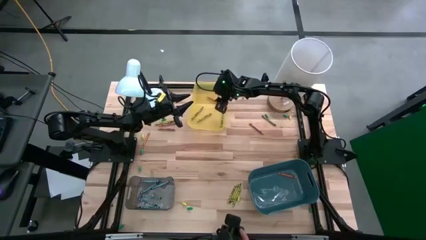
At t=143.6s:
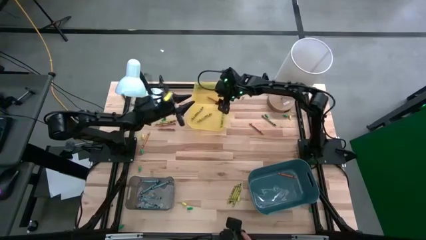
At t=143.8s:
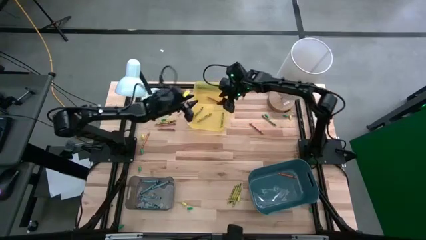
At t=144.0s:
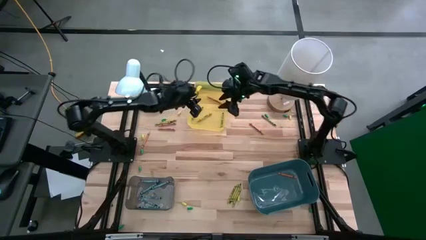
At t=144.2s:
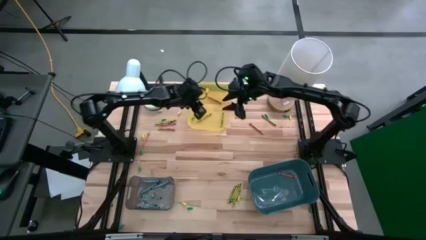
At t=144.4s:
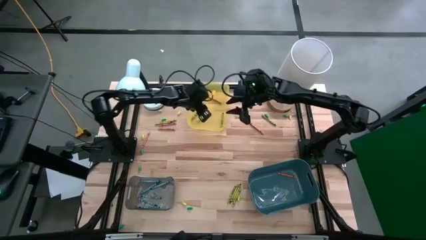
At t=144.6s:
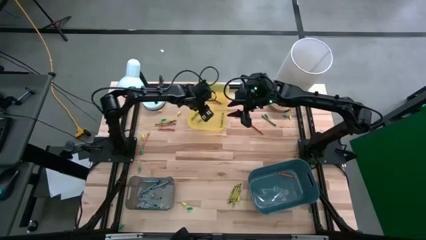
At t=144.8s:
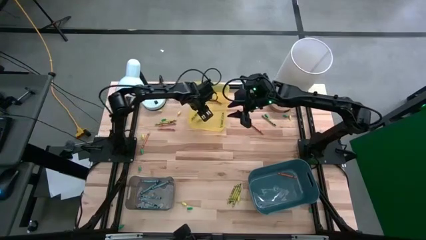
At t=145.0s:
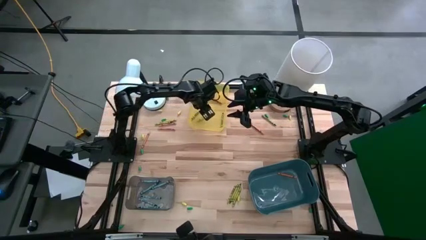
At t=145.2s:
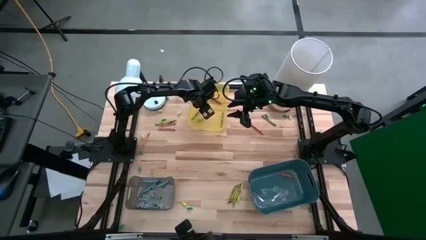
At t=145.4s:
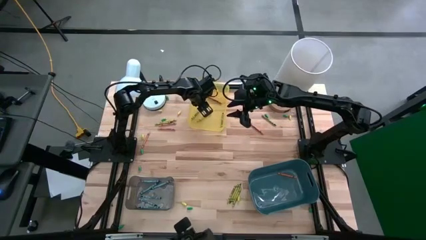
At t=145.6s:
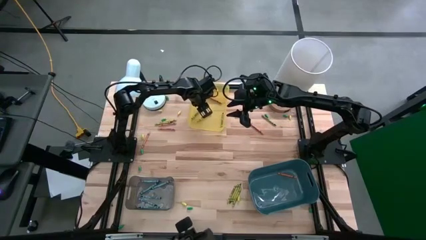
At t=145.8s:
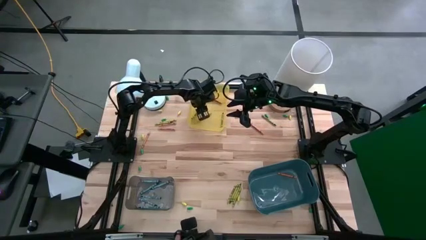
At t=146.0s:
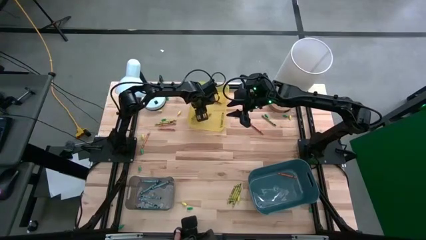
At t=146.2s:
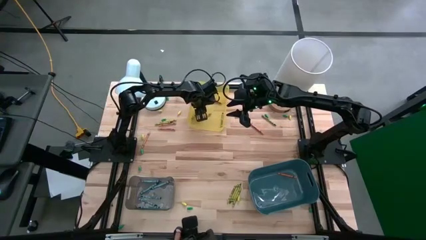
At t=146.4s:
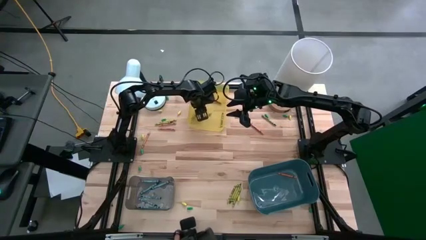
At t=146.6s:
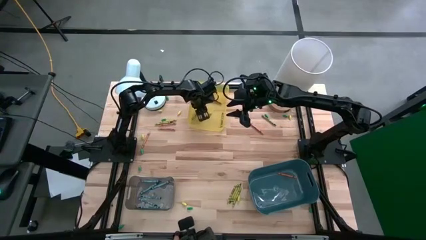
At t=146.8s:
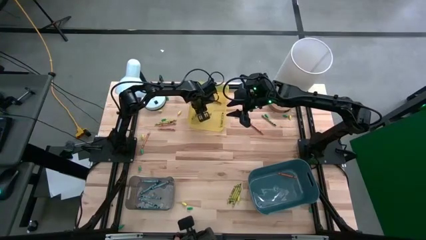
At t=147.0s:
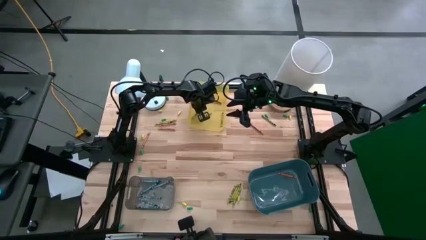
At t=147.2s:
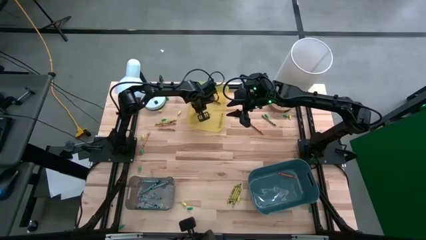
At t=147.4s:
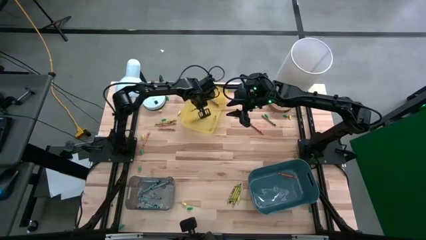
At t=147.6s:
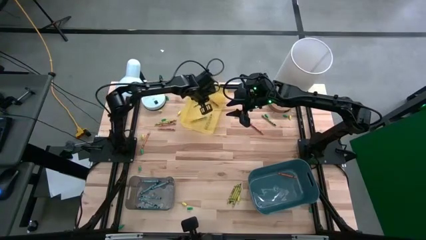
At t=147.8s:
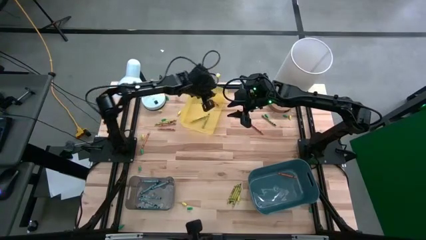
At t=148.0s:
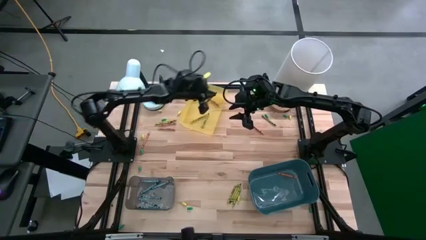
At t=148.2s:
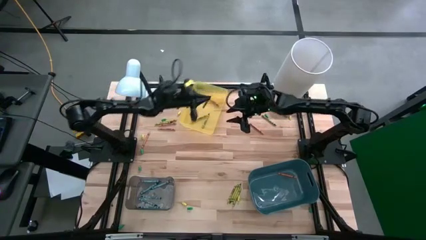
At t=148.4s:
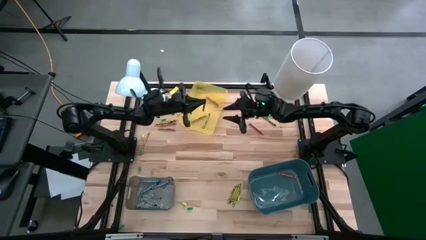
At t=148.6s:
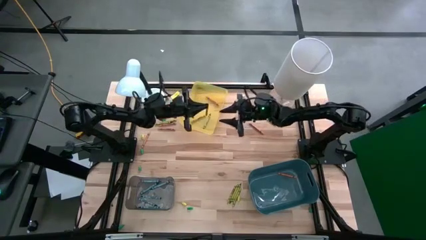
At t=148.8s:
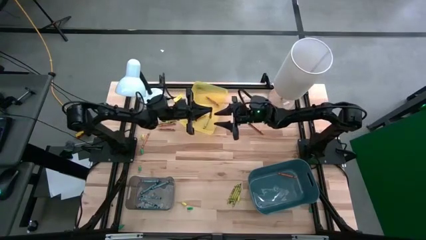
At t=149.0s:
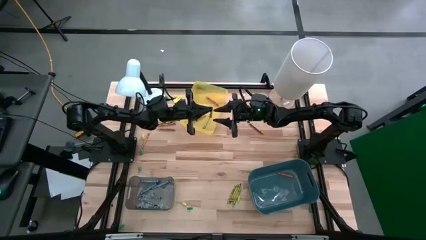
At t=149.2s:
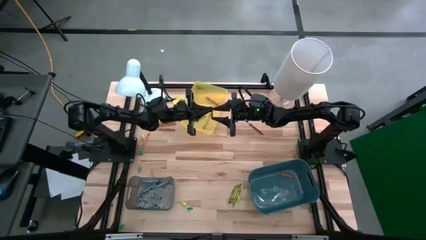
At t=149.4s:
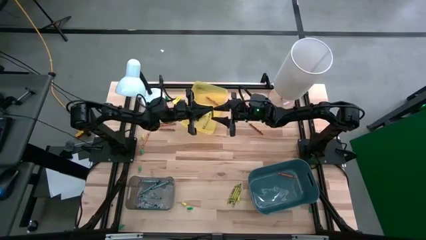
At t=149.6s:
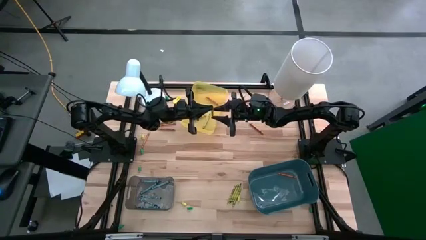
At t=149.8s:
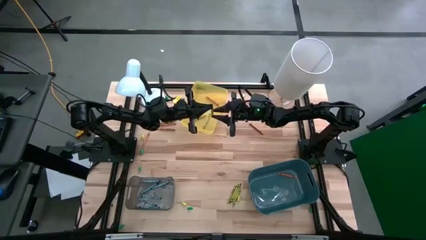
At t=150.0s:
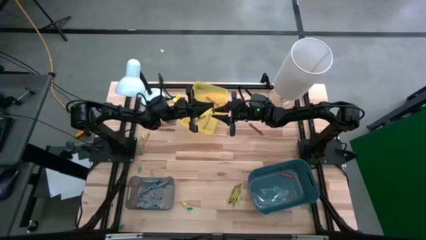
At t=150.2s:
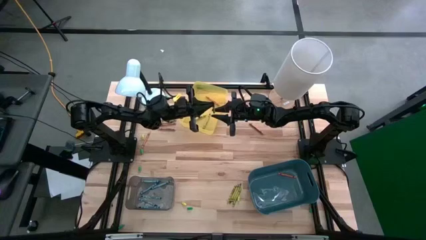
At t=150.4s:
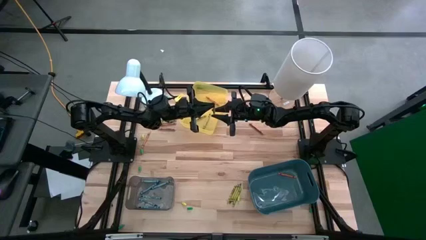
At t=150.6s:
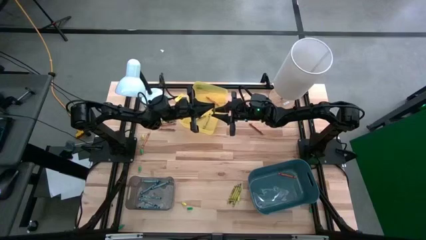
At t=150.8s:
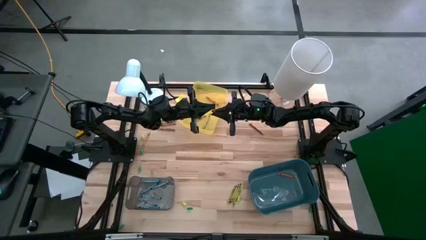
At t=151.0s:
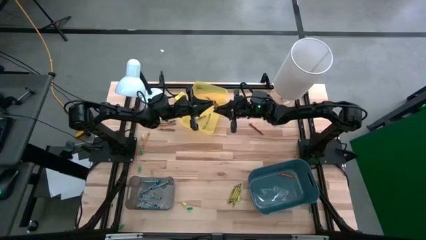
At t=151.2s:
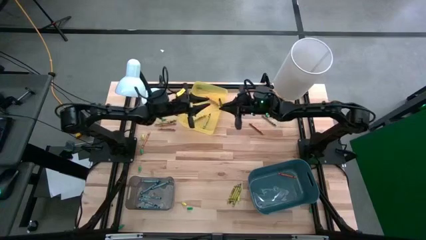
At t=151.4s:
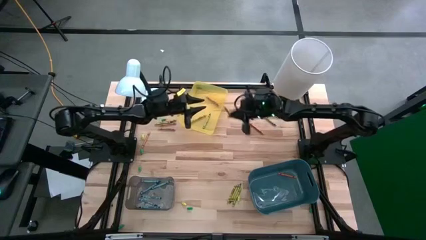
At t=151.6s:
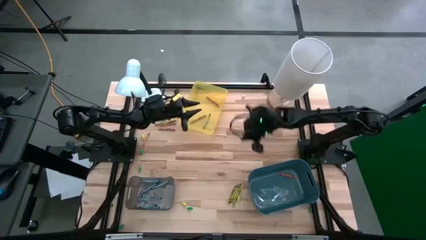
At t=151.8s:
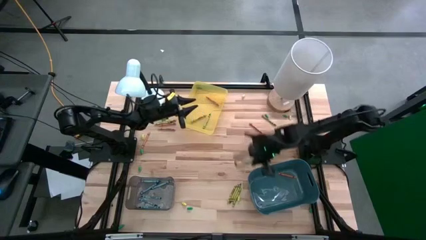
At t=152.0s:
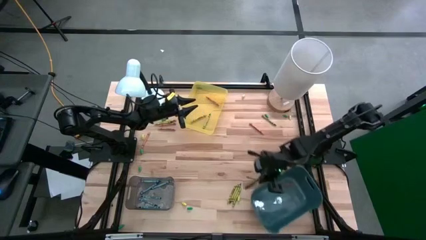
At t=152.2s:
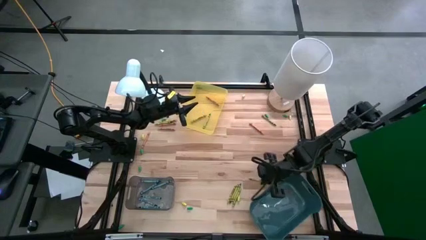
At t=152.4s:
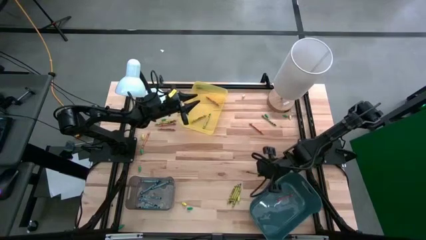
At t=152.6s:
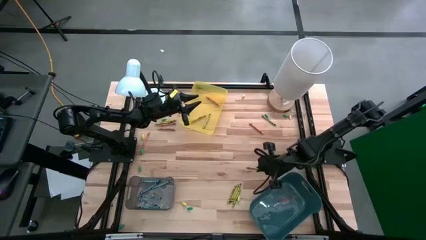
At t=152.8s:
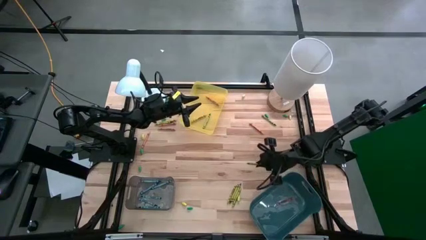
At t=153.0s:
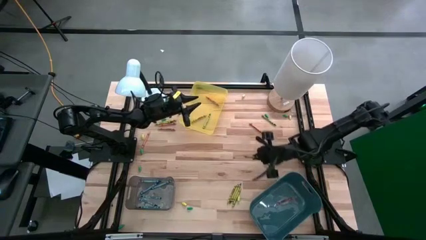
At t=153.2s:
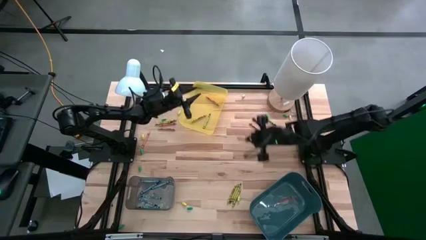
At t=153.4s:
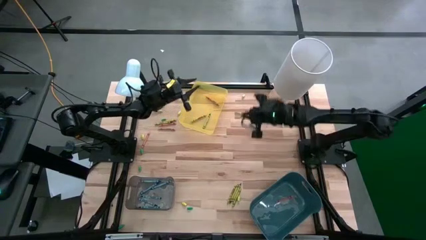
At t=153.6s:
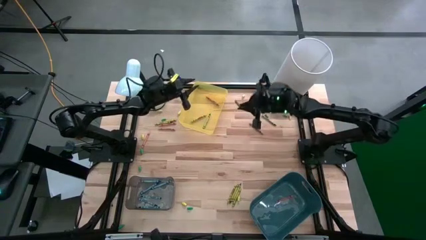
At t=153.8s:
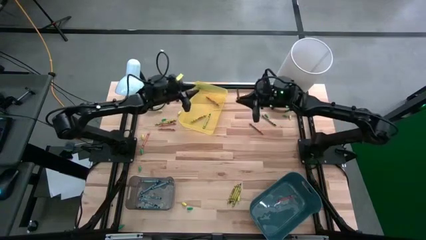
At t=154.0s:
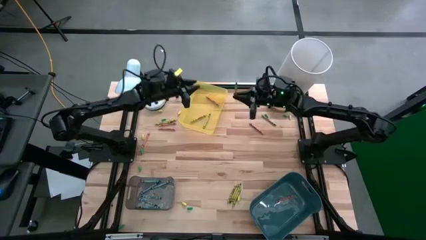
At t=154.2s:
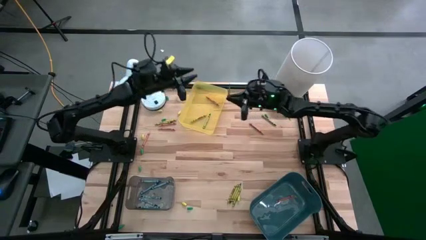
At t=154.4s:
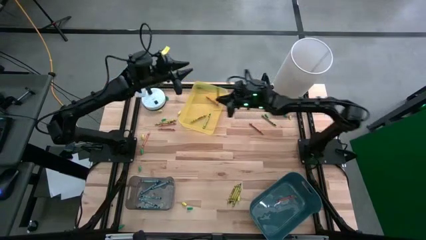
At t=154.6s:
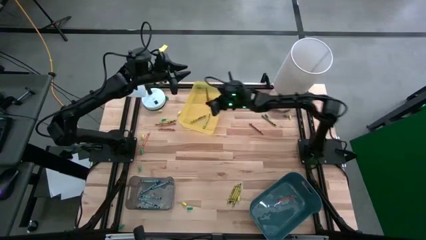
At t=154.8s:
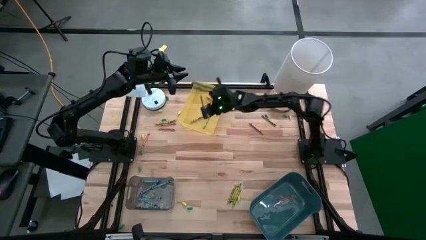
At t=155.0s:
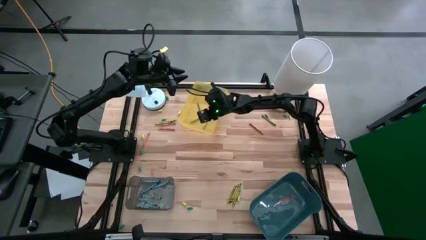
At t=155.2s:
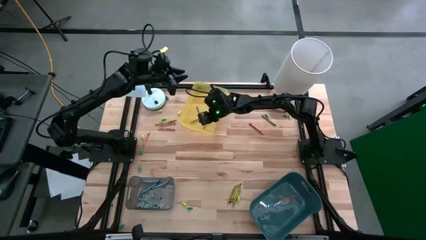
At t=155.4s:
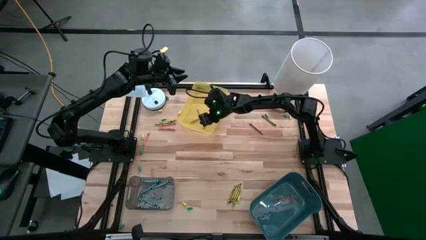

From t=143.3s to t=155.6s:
Task: Sort crayons
Adjust the green crayon in the yellow bin

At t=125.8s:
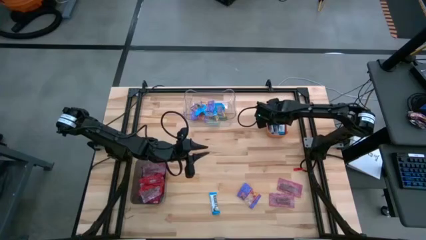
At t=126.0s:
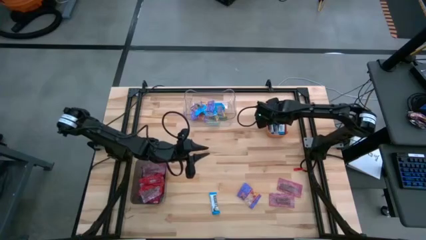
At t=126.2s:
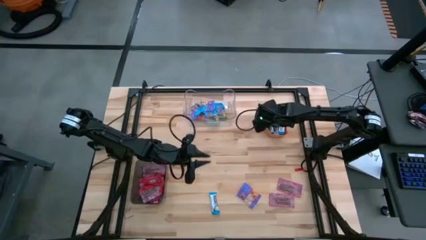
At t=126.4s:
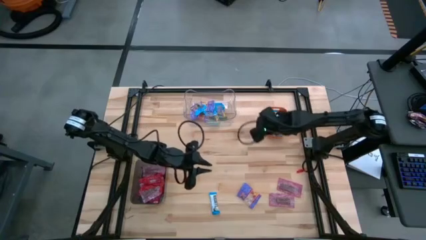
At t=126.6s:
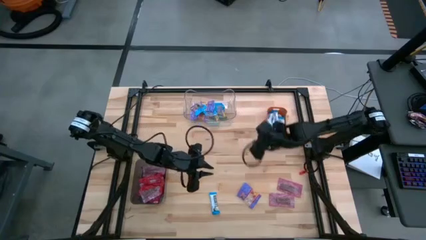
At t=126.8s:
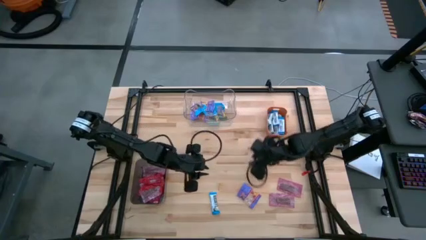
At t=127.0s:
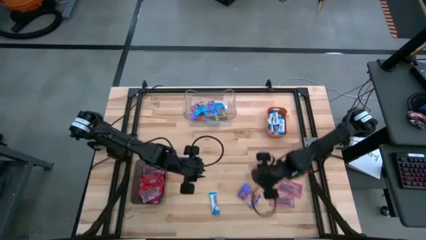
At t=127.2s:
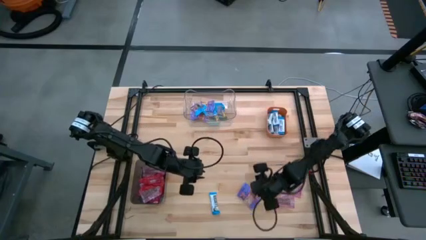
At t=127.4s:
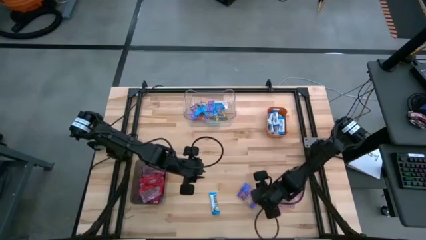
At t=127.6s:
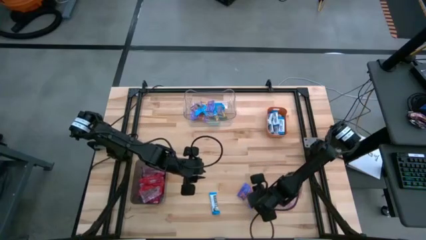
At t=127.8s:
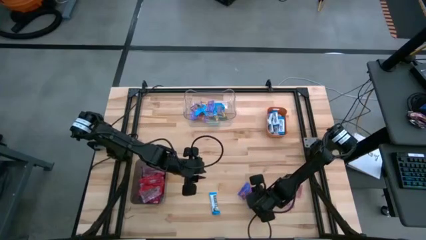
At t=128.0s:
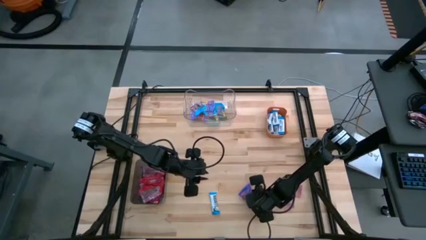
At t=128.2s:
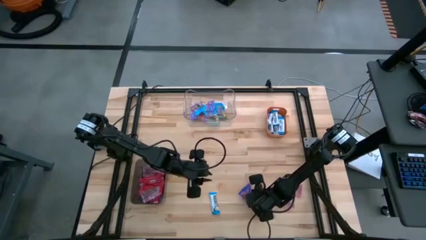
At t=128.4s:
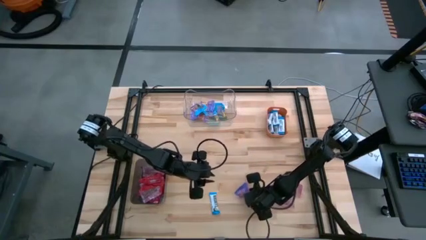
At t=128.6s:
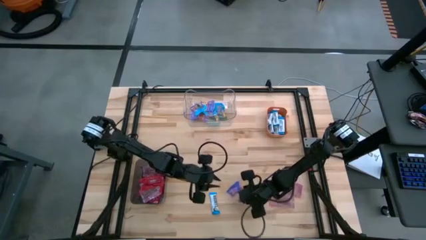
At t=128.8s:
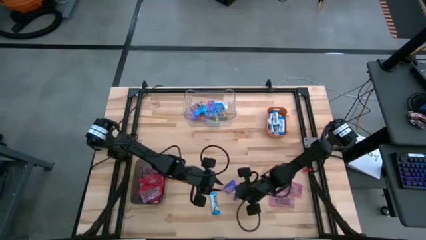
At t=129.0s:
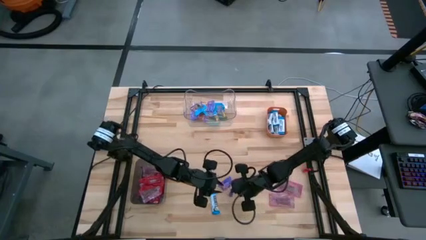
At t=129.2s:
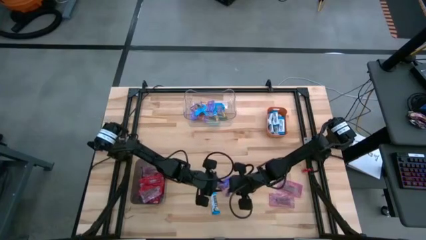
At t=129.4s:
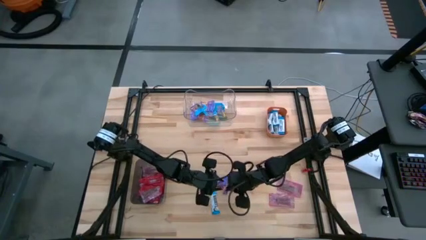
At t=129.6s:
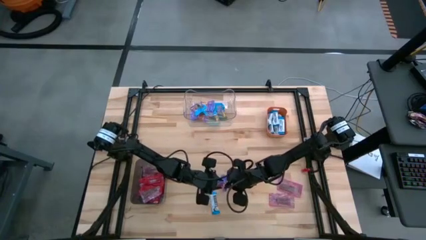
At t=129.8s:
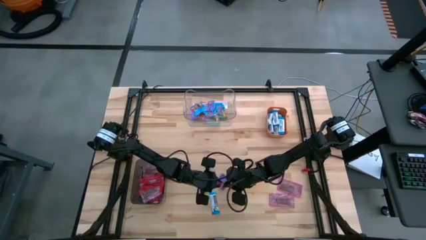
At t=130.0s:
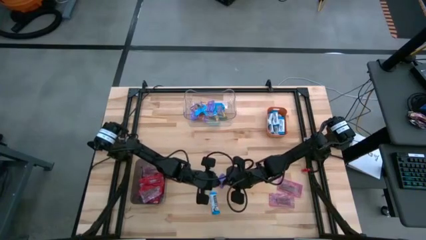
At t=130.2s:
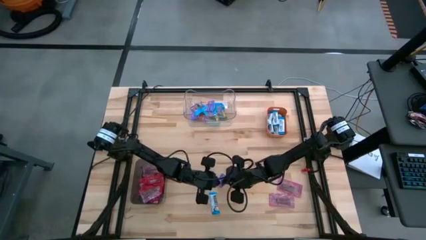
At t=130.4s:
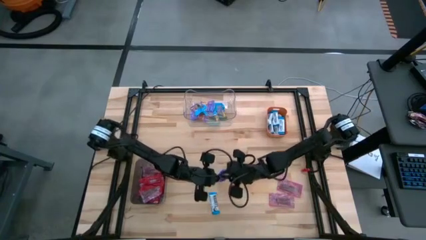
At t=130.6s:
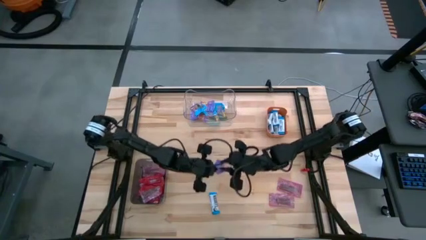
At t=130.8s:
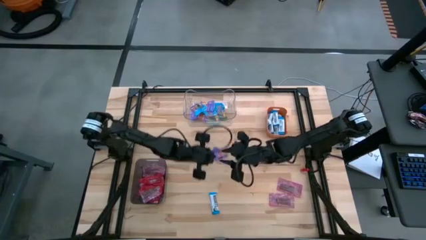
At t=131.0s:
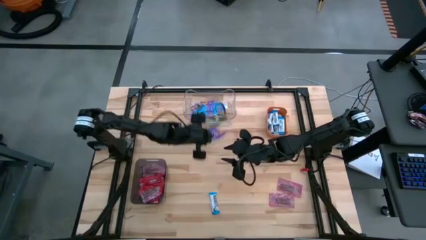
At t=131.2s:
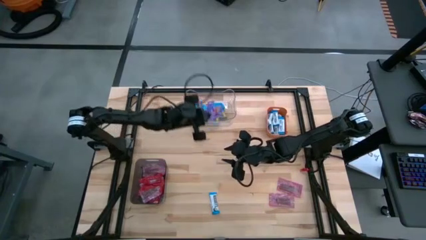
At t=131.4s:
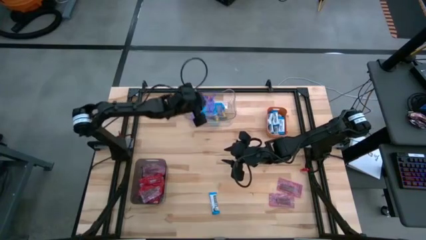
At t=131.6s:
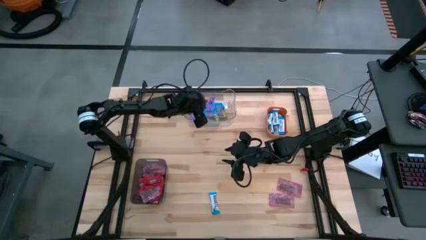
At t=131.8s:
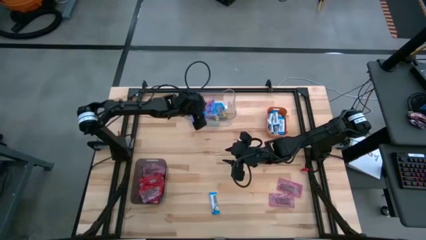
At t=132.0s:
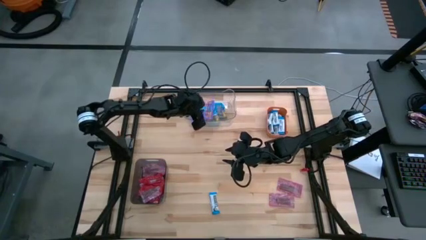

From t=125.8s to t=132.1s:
Task: Sort candy
Put the dark blue gummy into the transparent bin
